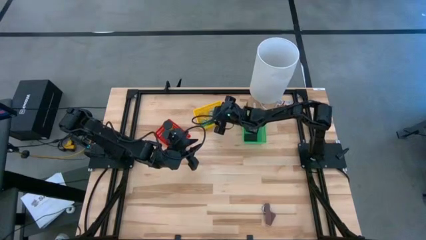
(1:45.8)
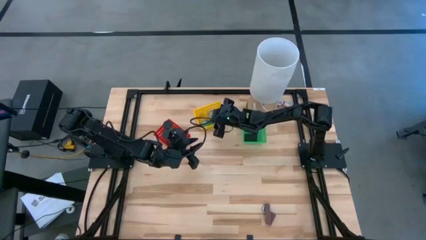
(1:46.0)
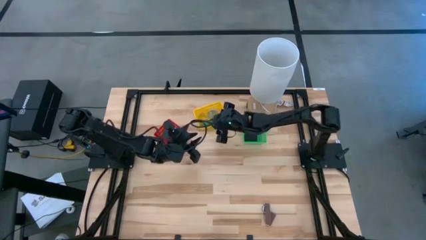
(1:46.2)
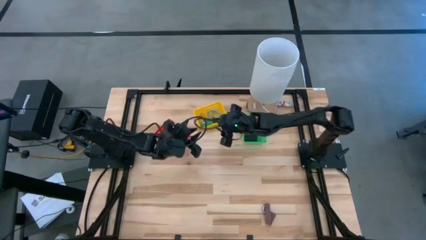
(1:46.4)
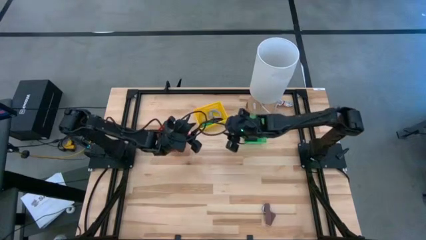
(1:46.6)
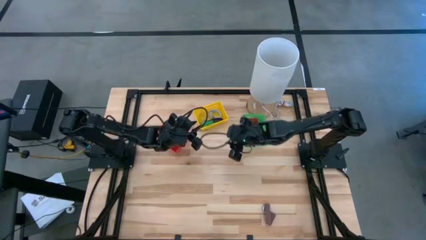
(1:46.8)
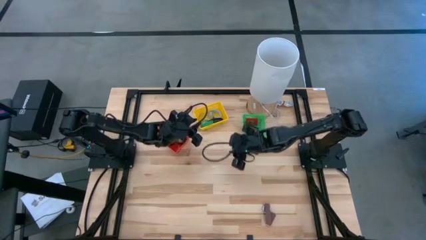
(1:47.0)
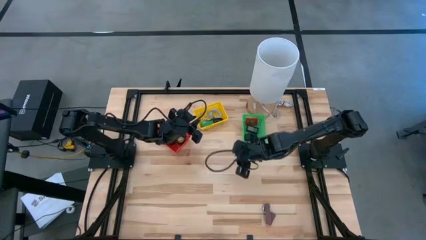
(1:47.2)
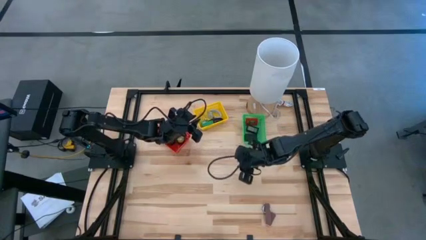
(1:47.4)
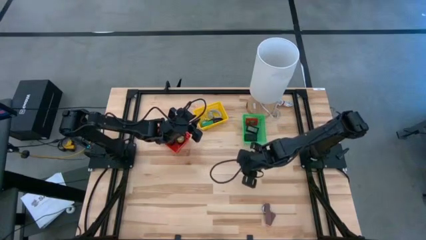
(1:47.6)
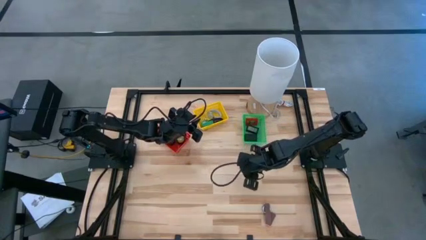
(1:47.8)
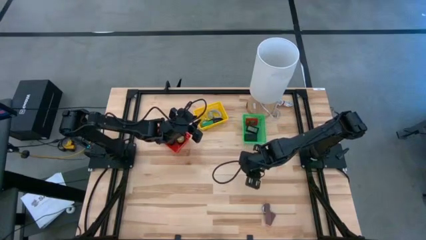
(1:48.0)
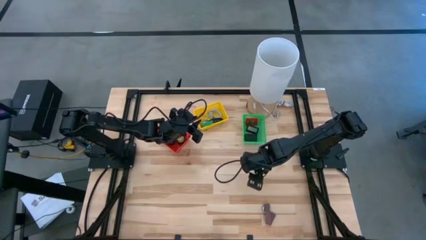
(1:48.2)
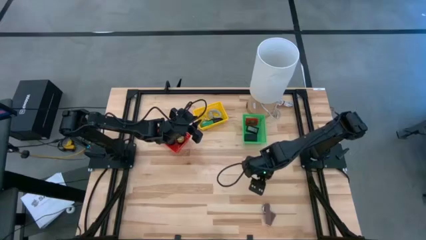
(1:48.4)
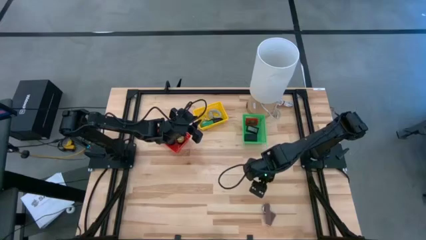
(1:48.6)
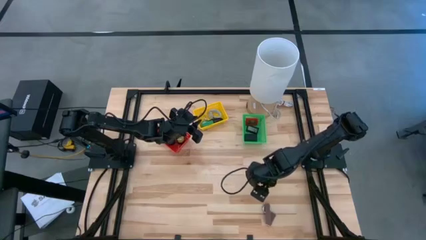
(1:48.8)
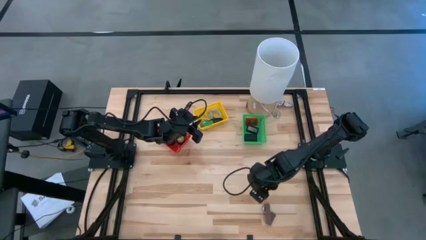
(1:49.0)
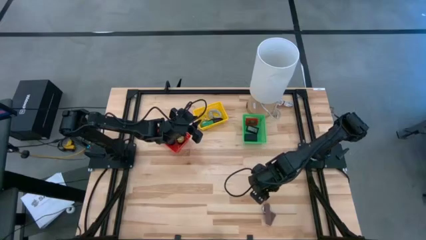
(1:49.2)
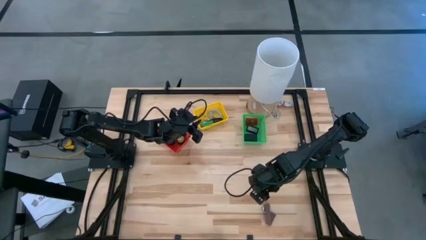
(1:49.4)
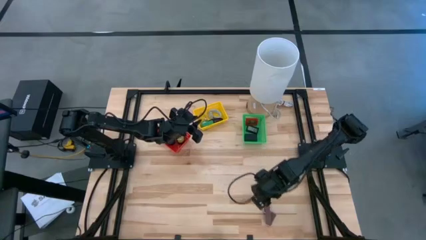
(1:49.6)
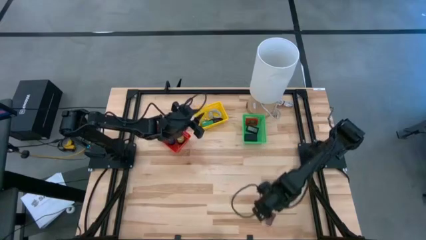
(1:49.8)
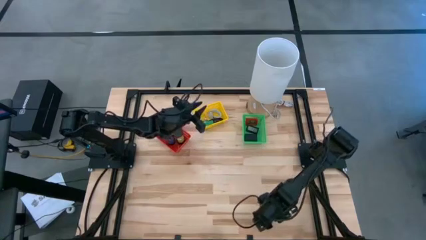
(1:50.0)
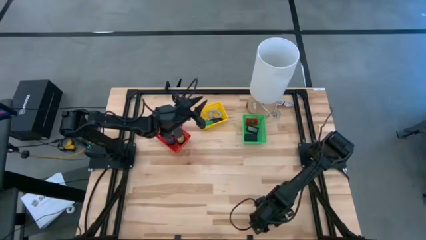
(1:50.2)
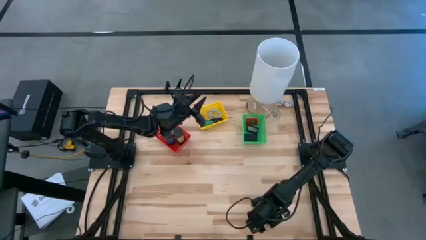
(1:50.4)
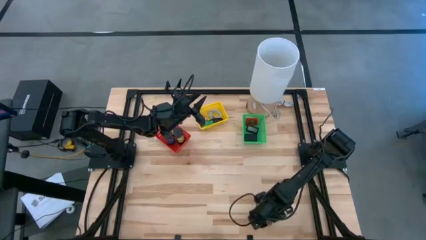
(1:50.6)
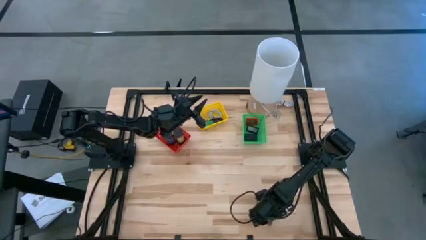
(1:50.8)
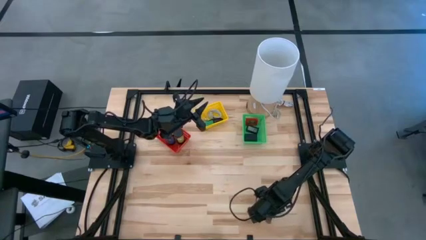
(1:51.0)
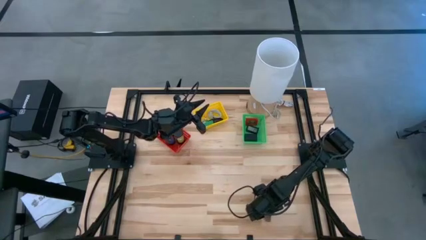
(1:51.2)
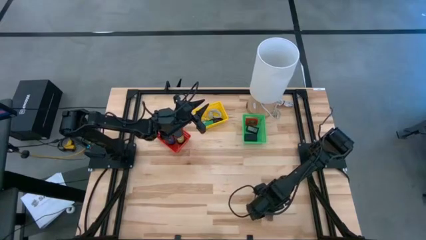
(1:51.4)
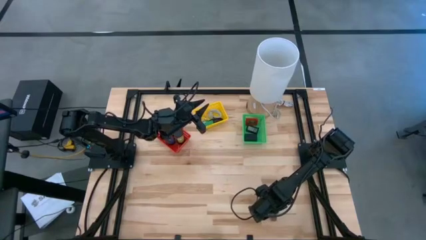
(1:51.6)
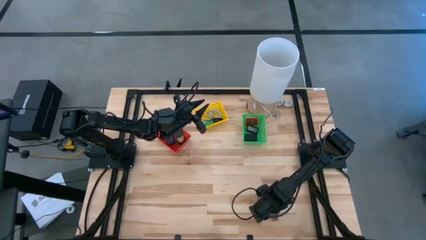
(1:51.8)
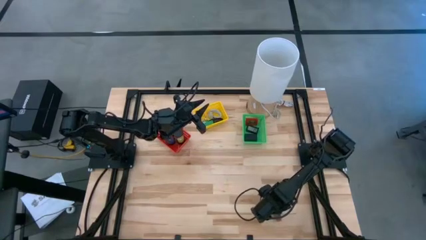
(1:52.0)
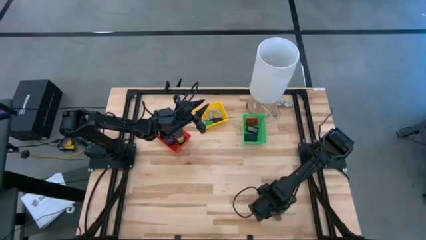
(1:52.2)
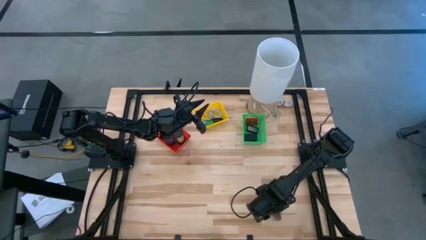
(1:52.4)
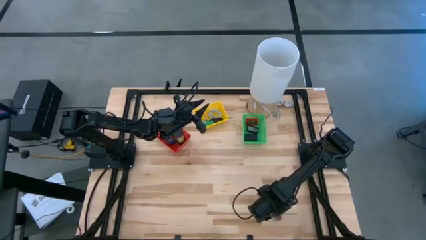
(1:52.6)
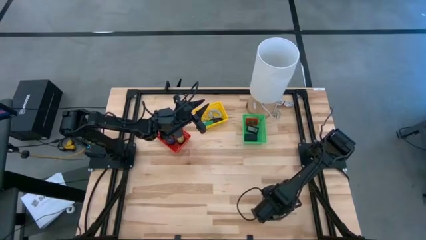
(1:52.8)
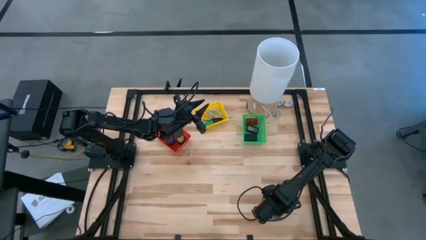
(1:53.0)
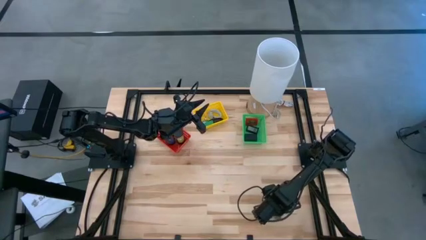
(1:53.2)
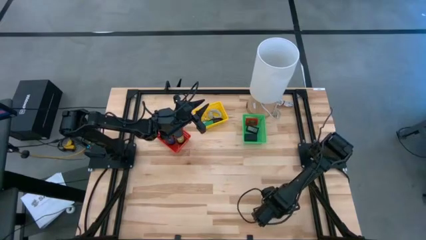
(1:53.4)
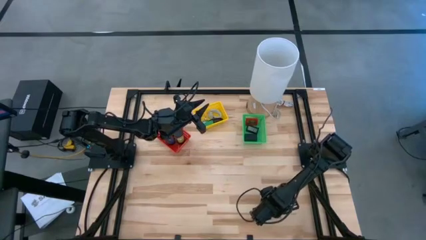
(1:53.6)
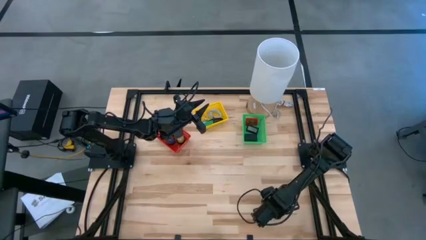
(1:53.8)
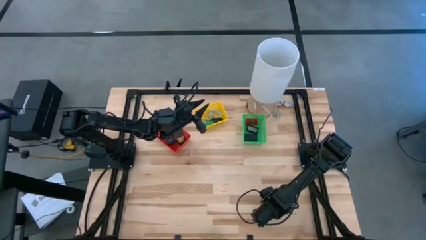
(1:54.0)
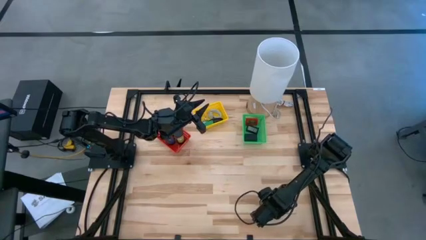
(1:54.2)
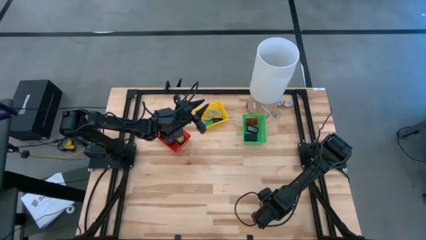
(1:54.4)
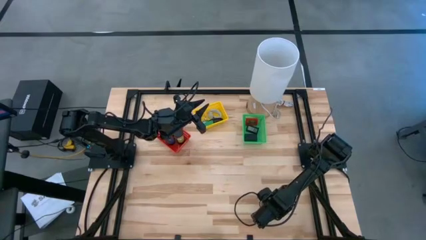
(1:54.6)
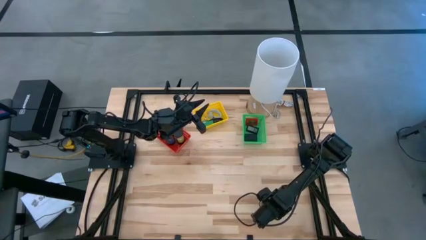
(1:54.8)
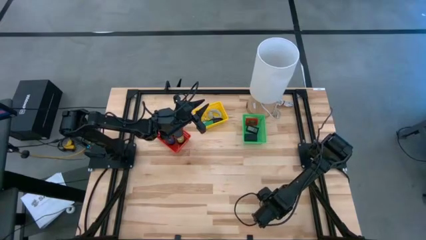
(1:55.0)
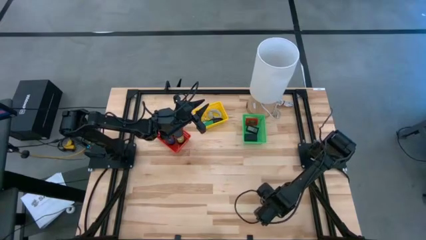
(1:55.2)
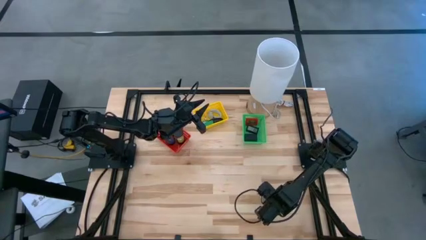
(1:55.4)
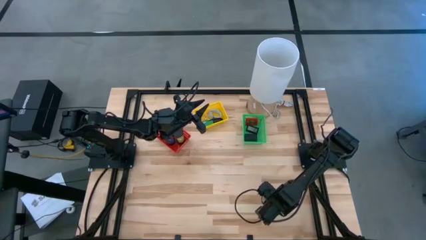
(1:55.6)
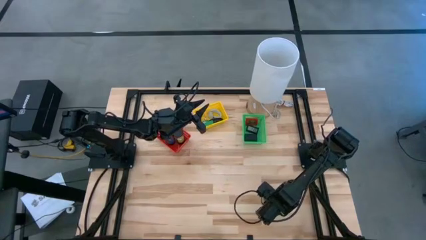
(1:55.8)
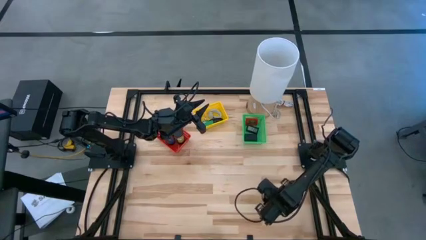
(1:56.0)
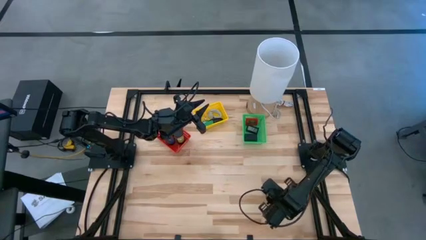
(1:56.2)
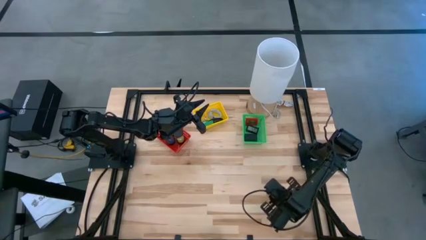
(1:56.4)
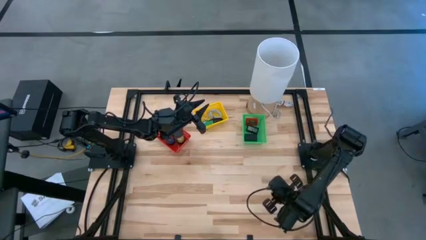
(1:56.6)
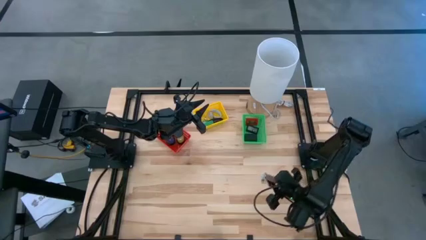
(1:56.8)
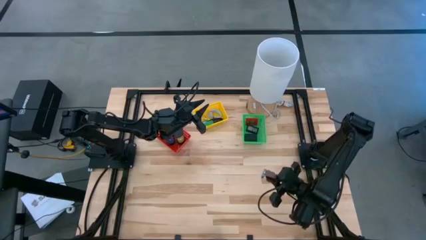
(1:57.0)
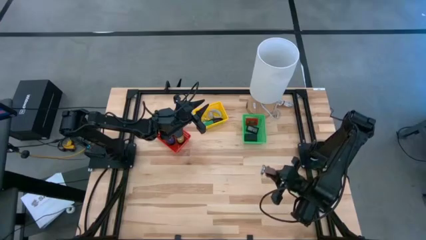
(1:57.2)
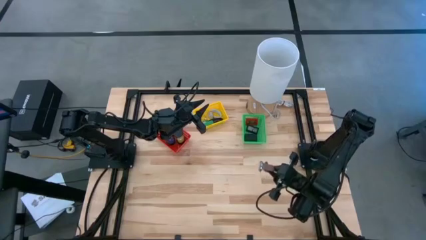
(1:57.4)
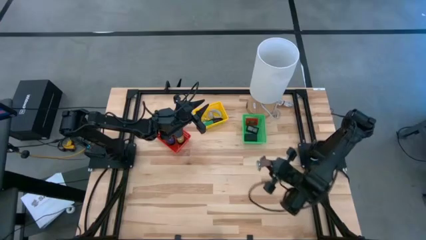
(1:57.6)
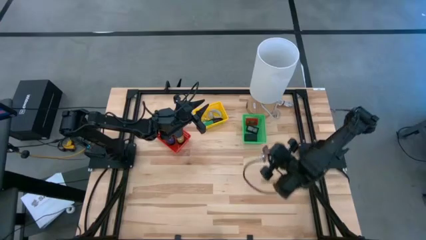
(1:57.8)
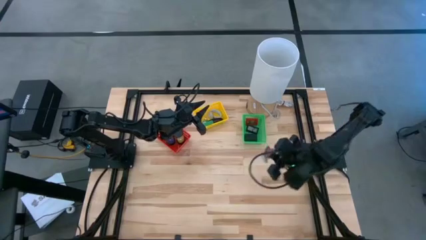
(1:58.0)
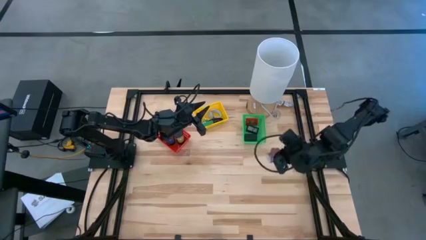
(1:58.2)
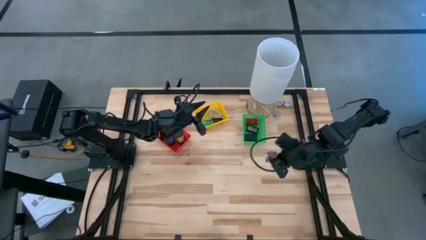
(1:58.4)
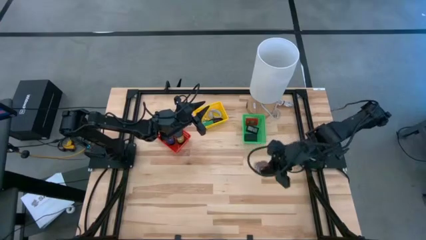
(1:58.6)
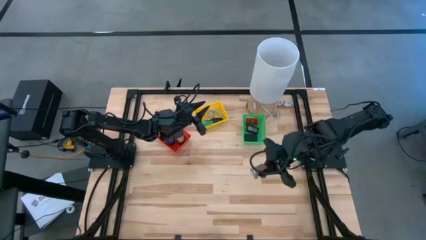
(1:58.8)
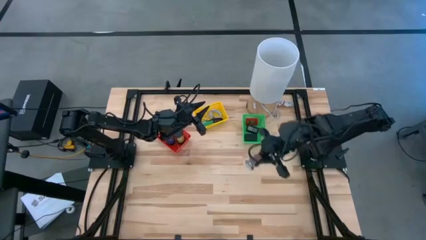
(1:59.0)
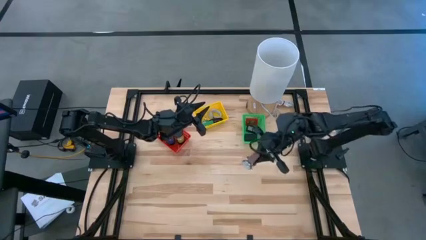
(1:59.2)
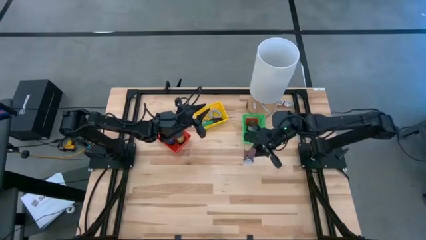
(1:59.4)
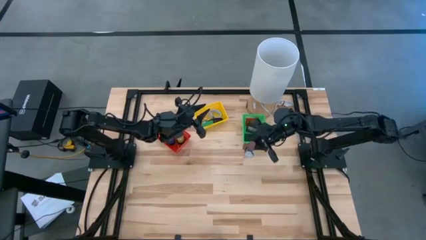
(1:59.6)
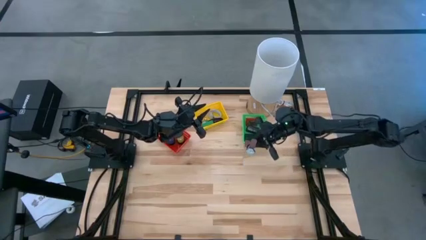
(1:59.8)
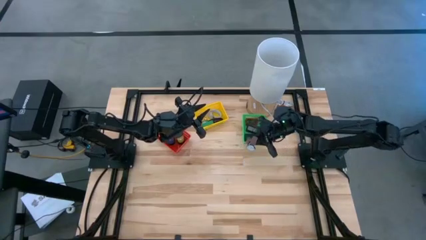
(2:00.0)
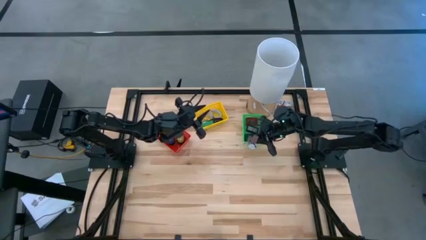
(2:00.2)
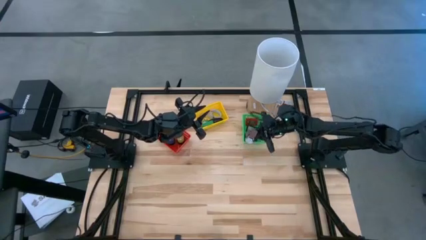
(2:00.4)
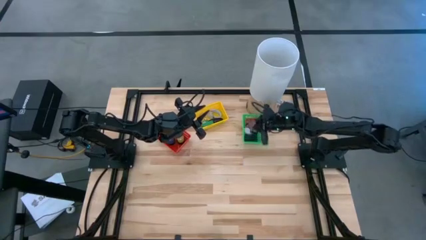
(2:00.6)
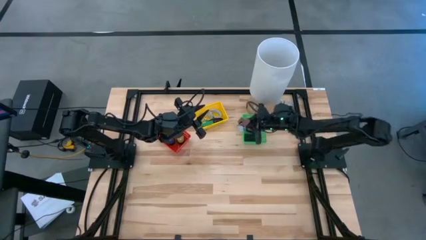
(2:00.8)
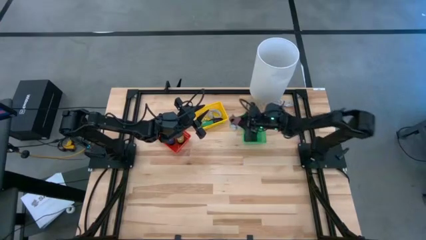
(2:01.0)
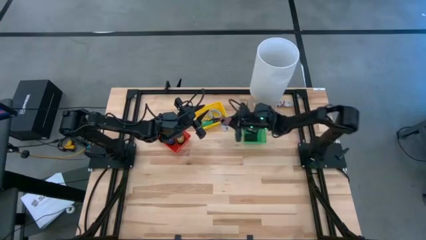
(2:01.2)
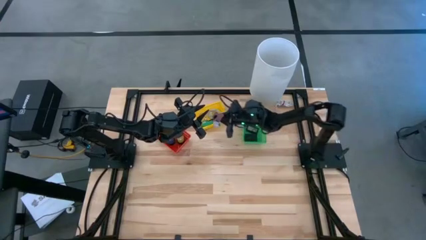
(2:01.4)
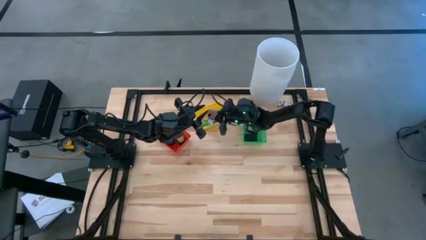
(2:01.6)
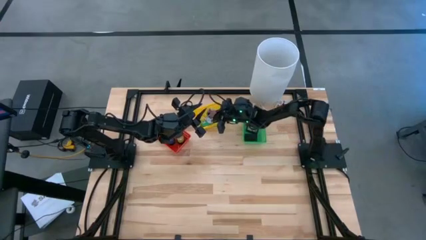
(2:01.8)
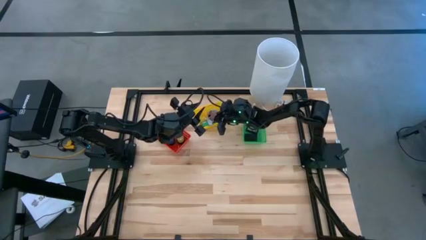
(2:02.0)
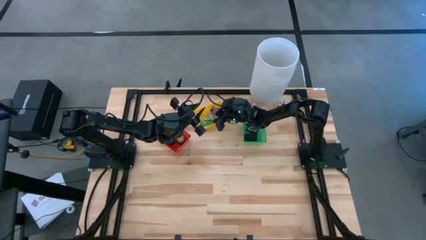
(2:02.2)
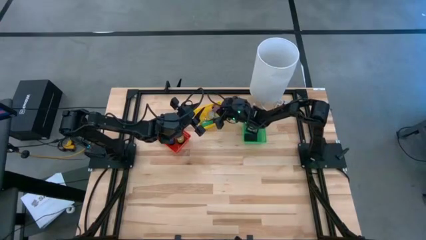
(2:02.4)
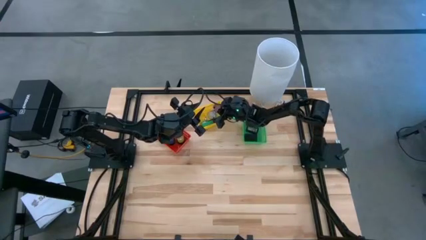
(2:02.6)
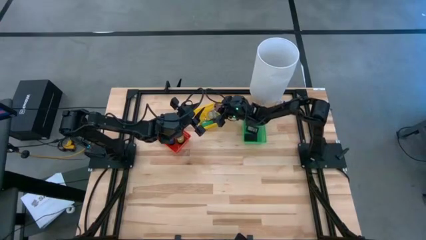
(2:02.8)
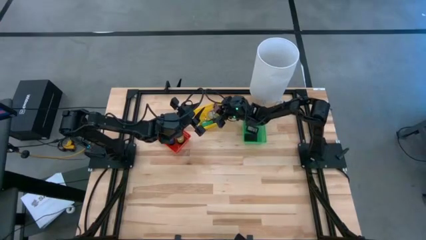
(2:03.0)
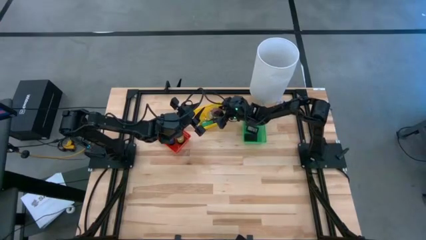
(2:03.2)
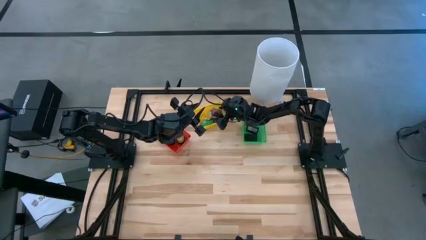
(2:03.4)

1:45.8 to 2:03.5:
Task: Pick & Place Office items
Put the brown watch into the yellow basket
